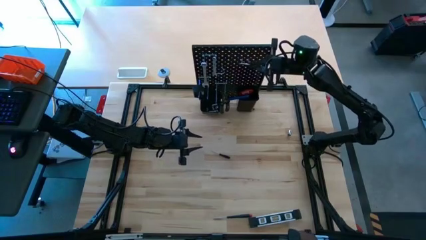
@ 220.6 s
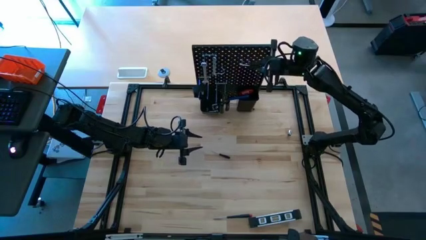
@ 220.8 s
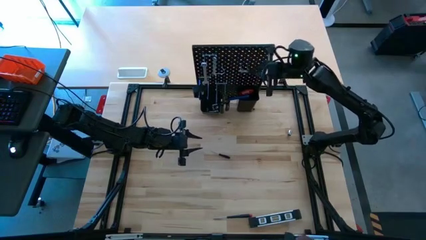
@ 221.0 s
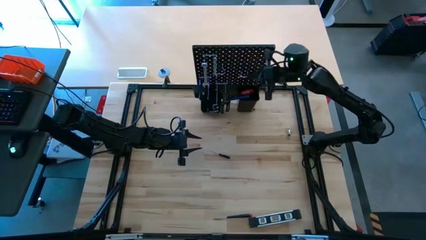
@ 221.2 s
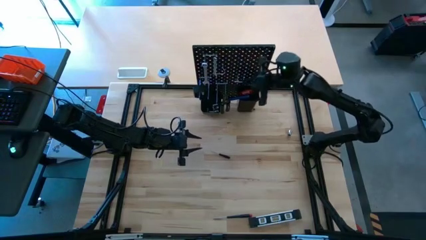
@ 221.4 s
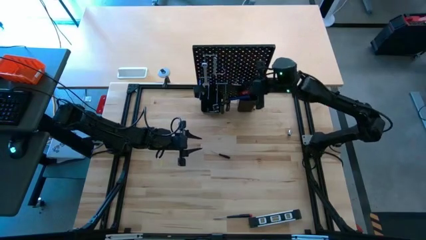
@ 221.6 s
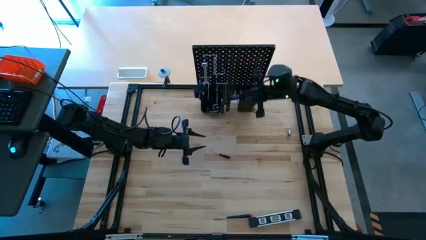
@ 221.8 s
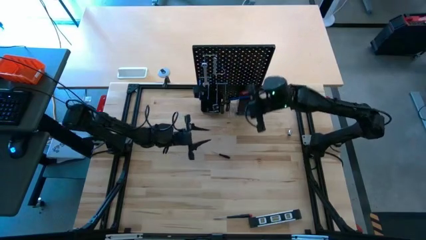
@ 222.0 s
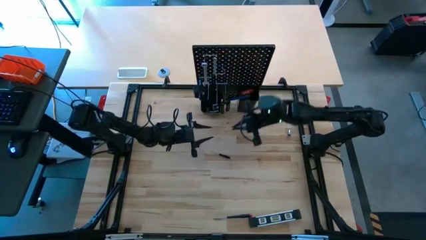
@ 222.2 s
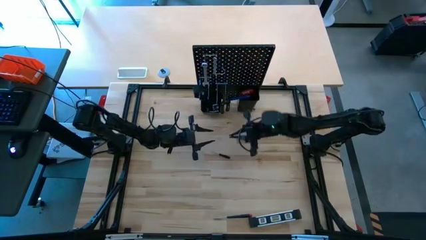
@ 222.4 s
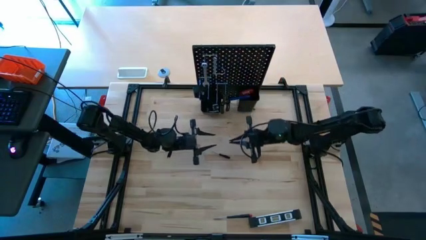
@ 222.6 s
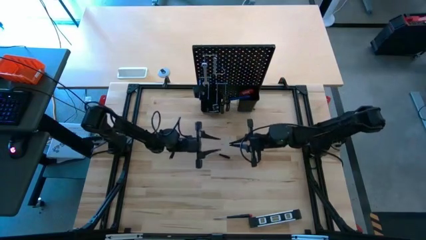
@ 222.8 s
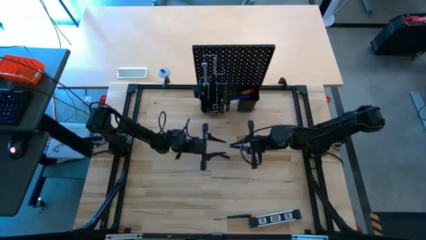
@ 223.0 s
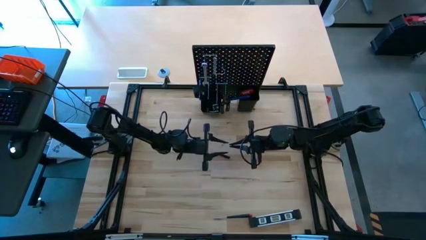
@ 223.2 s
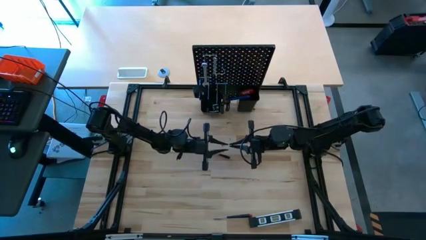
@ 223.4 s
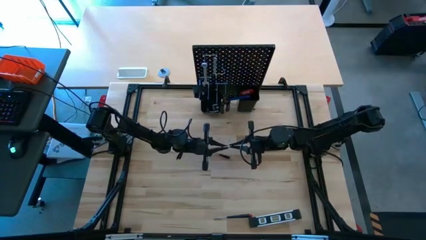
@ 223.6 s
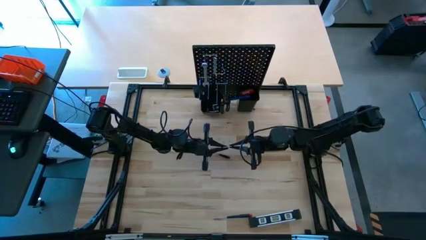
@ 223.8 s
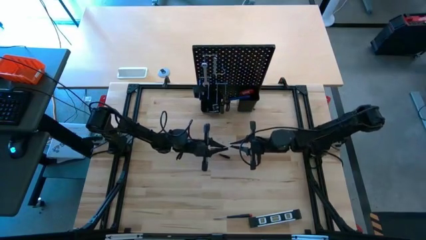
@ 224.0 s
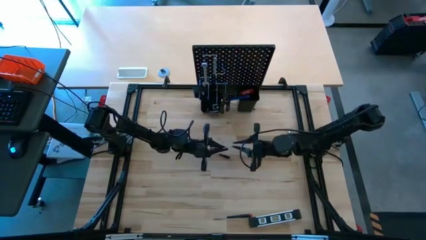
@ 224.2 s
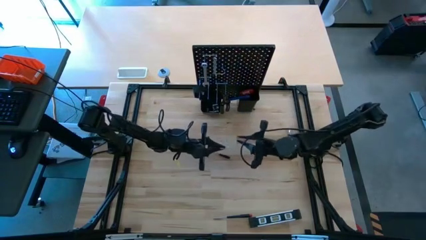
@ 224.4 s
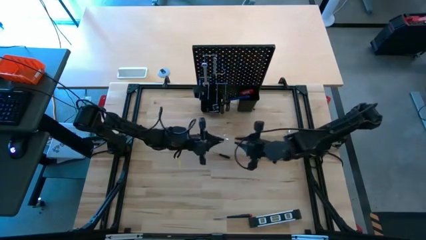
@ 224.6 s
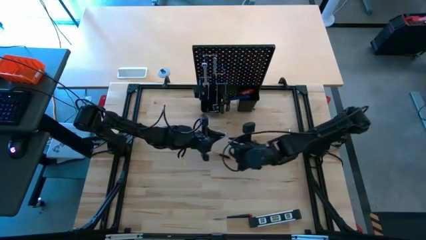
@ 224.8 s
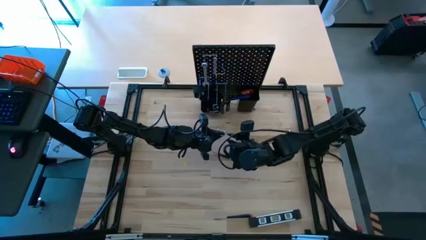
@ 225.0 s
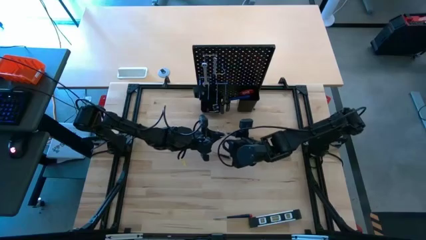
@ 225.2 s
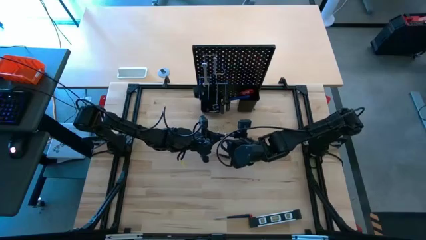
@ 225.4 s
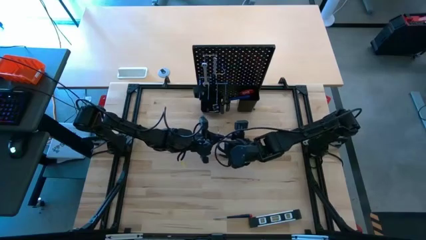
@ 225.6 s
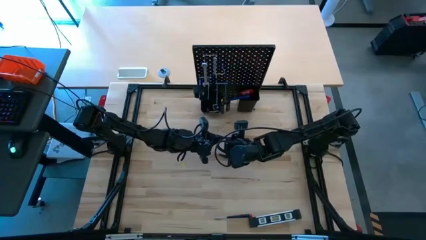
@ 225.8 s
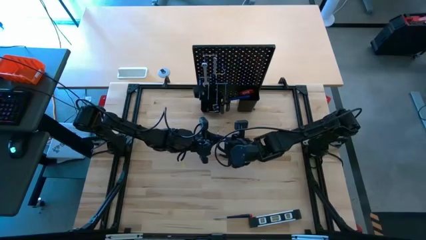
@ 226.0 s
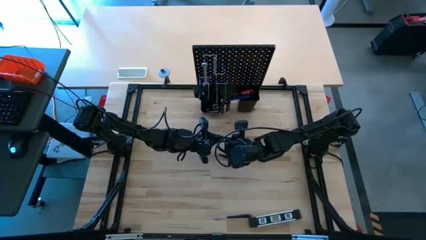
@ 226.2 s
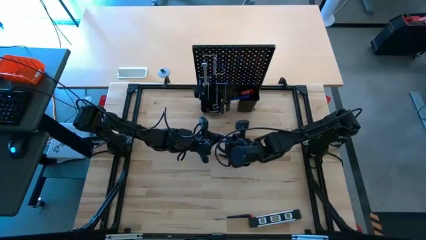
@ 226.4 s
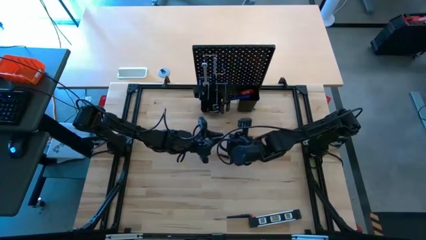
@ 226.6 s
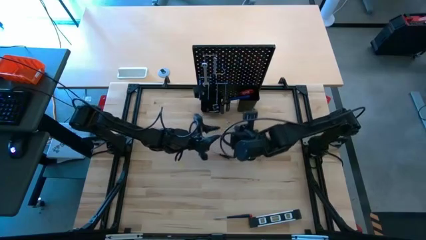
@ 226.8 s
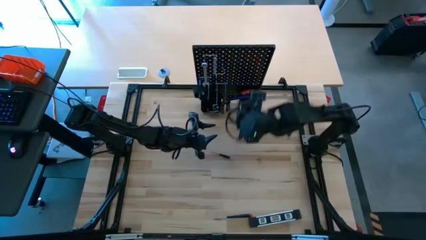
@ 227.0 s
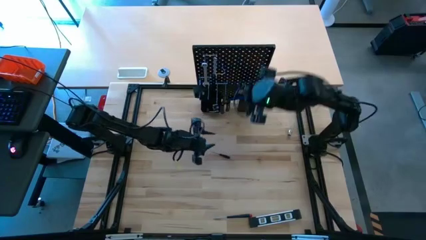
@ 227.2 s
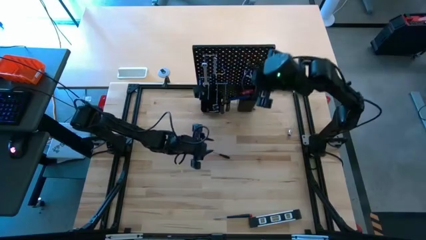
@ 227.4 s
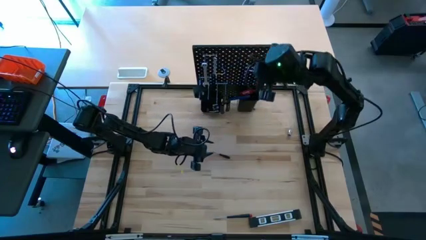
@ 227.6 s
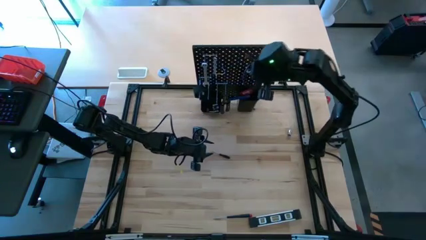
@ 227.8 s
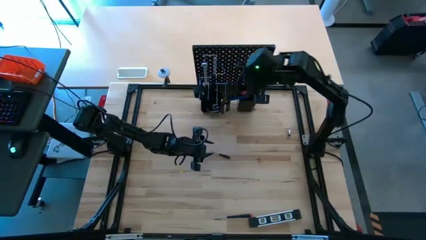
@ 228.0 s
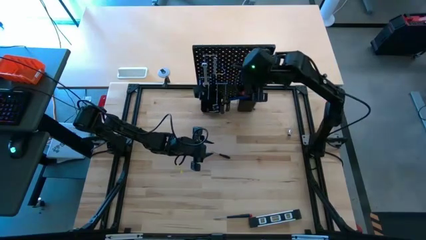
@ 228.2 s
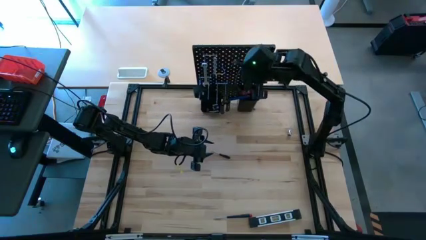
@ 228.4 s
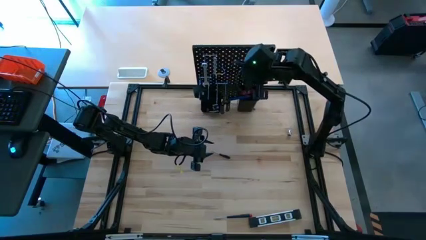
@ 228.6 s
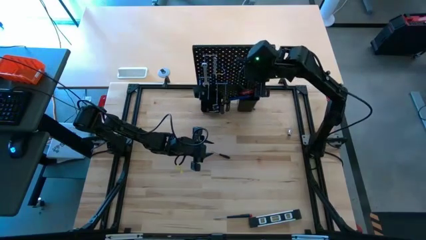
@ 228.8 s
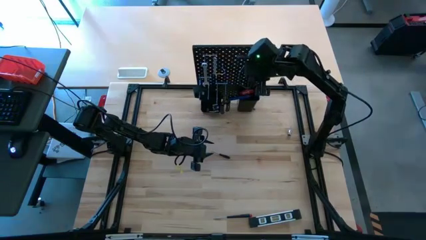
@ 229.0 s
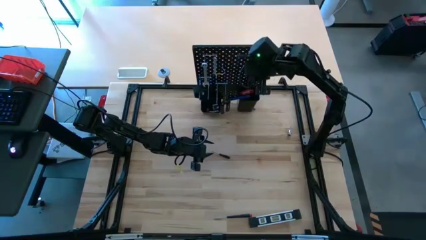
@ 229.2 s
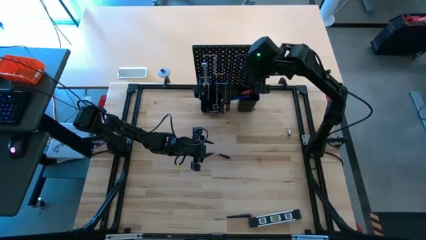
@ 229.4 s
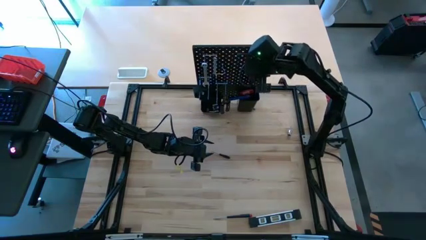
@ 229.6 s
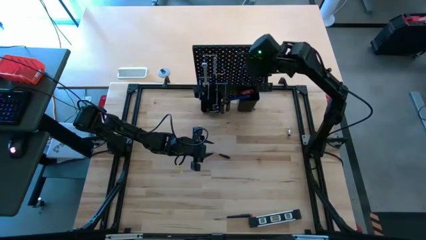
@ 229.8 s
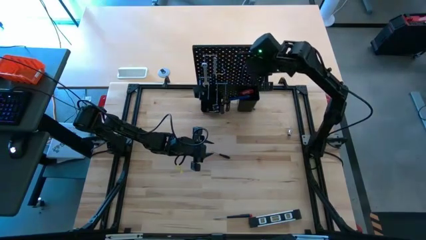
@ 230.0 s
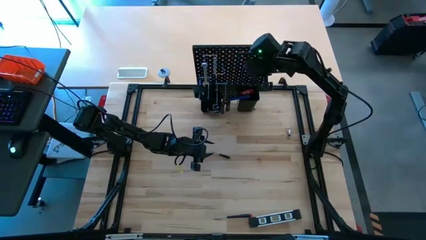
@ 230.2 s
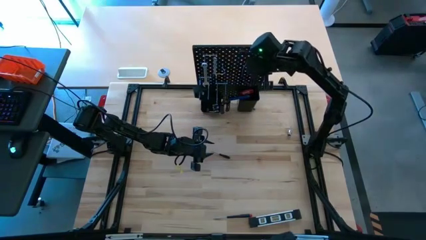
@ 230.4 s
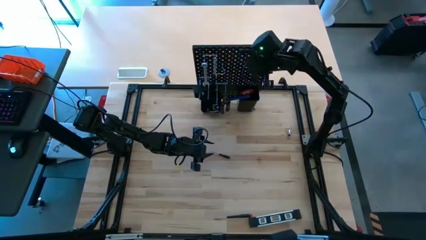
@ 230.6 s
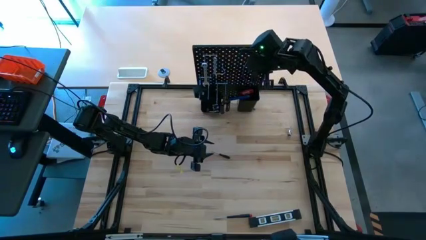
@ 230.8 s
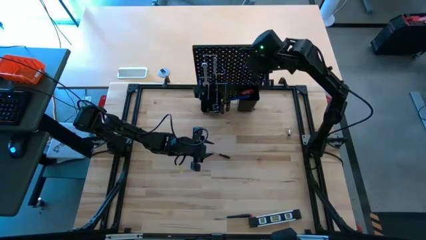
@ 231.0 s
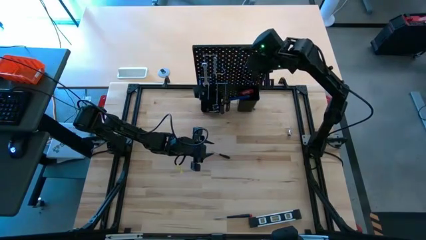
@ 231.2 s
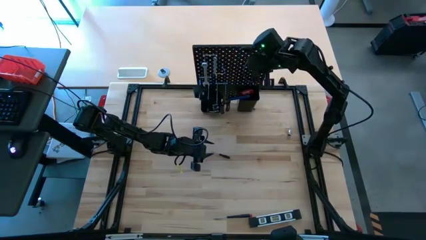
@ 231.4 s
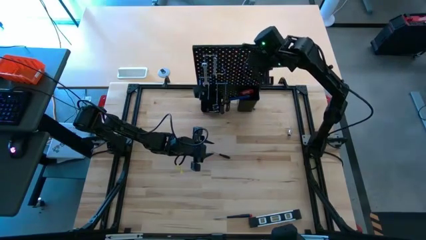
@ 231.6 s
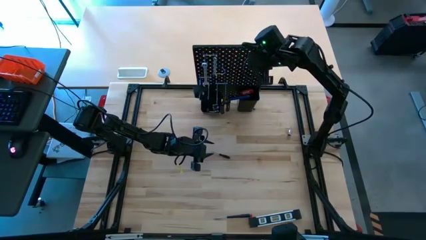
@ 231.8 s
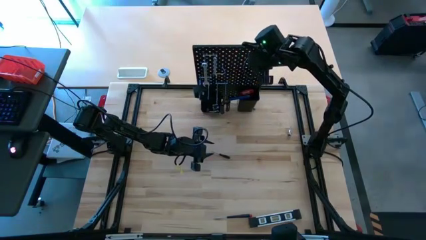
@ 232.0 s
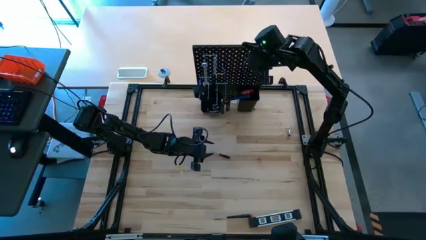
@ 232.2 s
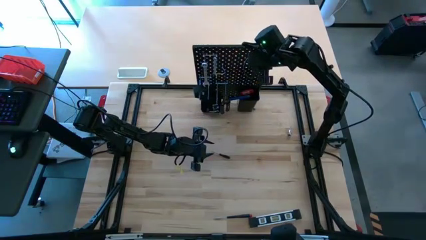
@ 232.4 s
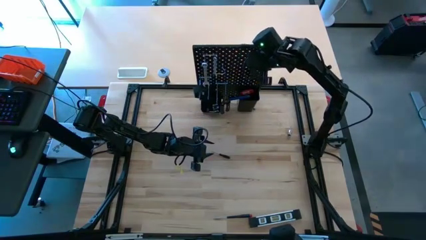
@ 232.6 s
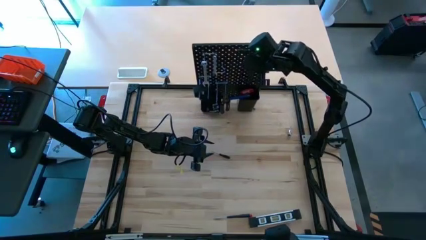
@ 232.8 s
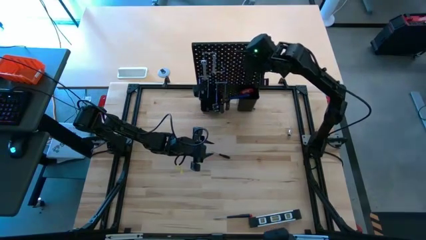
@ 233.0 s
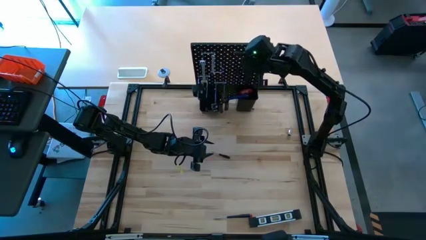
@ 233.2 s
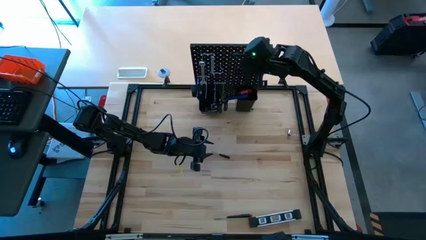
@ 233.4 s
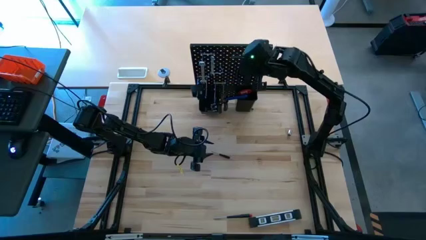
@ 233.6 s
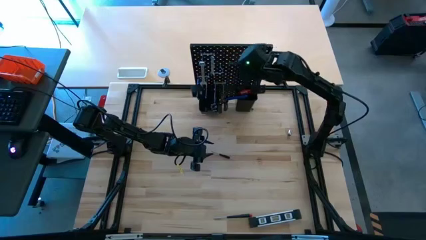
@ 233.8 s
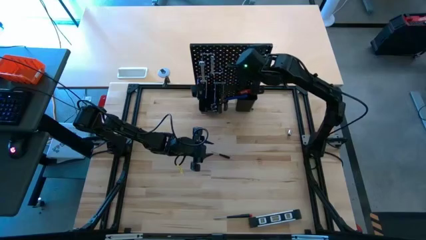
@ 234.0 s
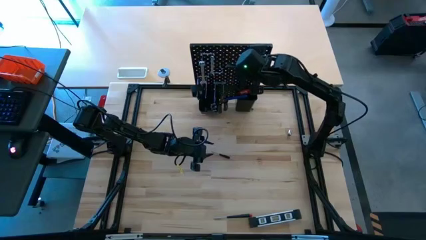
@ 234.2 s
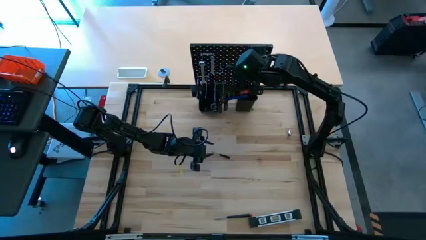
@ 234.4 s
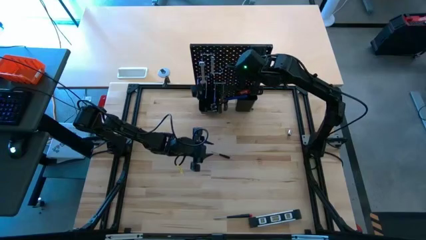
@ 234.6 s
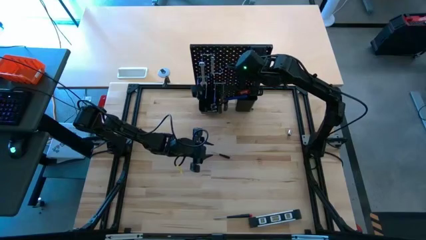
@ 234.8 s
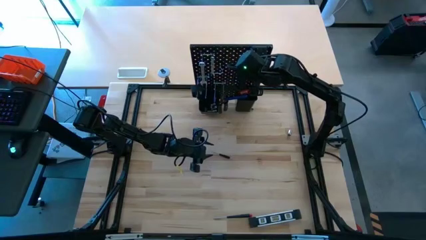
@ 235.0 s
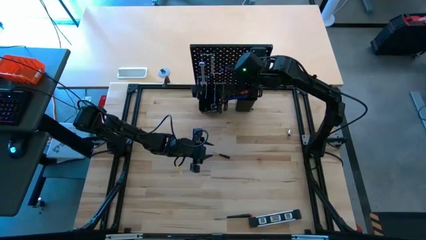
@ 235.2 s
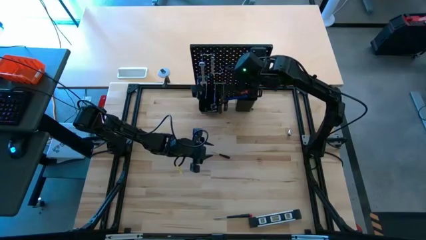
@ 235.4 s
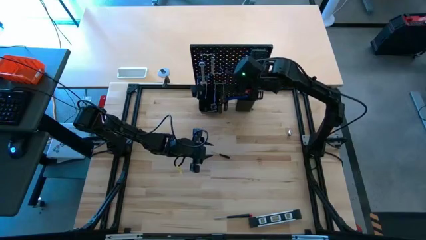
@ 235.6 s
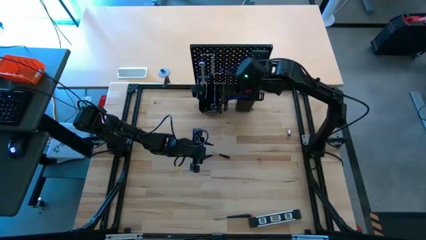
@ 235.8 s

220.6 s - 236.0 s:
Task: Hang tools onto peg board
Hang the binder clip on the pegboard

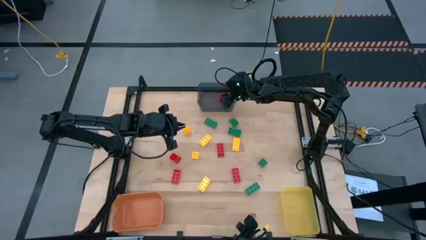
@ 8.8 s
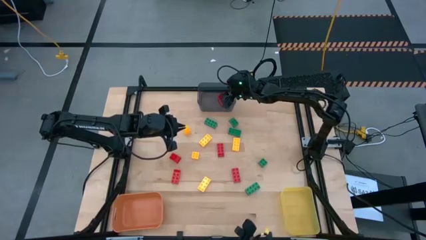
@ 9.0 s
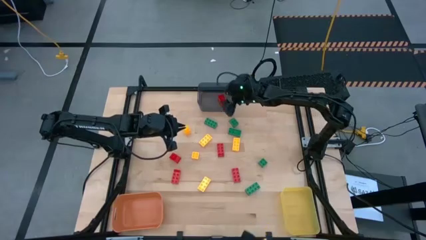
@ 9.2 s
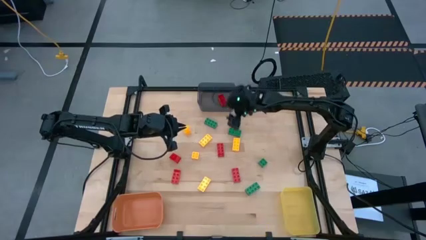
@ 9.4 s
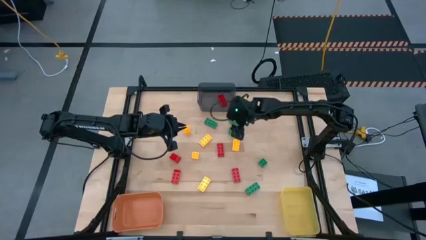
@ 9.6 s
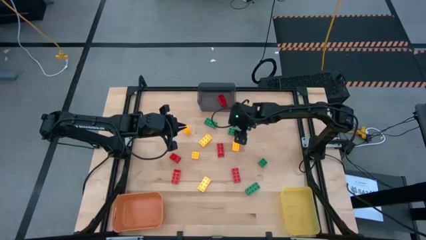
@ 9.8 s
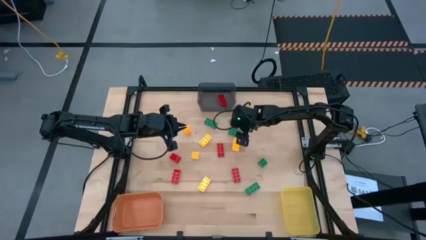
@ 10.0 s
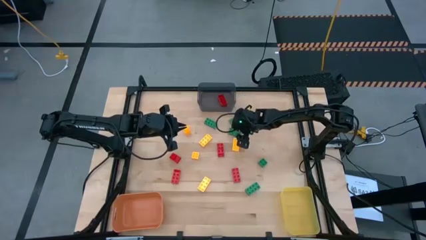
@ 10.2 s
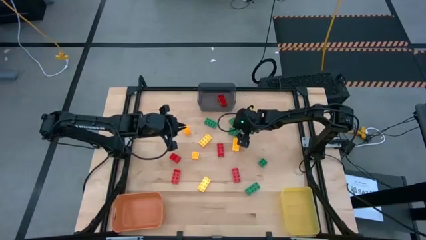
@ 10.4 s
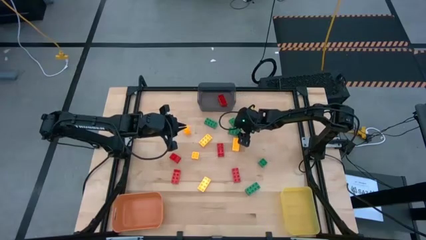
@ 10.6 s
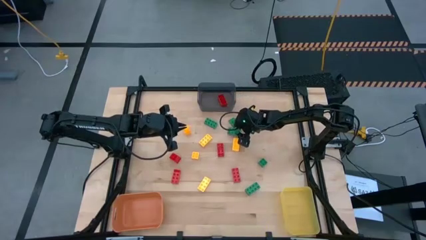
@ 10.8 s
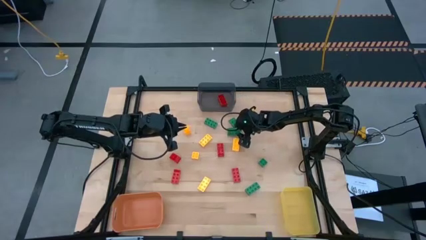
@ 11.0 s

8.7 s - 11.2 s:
Task: Sort & place blocks by color
Put the green game piece into the yellow bin
